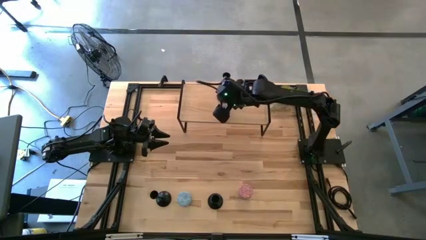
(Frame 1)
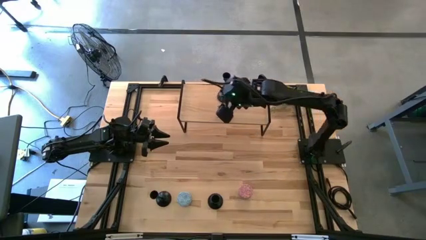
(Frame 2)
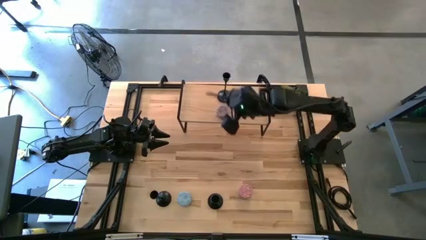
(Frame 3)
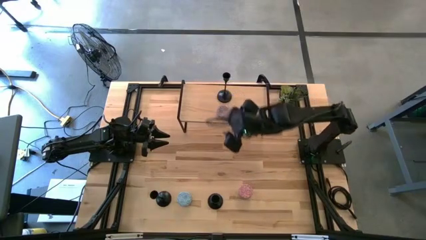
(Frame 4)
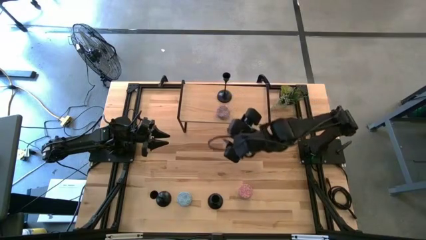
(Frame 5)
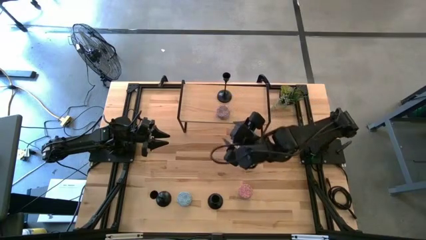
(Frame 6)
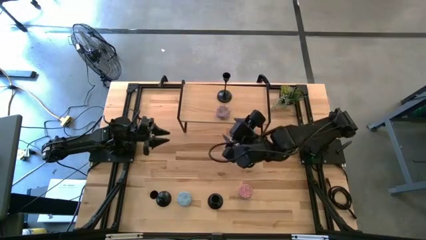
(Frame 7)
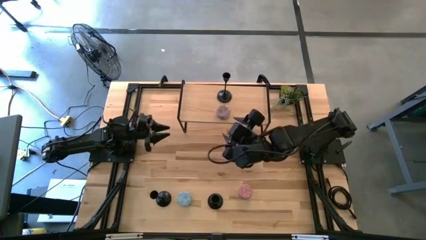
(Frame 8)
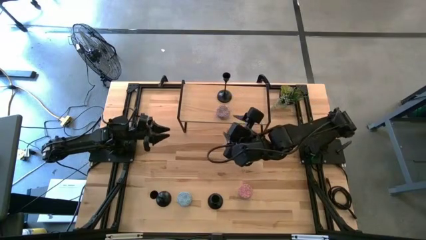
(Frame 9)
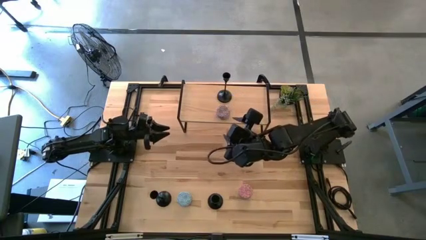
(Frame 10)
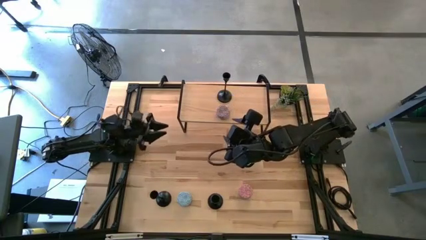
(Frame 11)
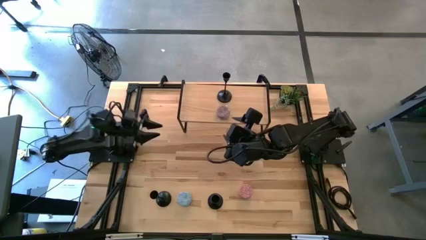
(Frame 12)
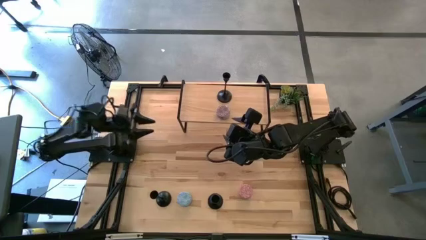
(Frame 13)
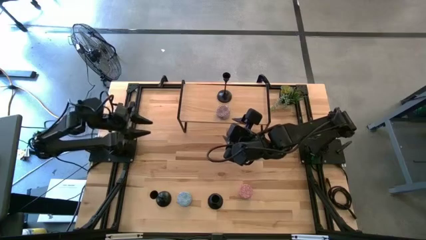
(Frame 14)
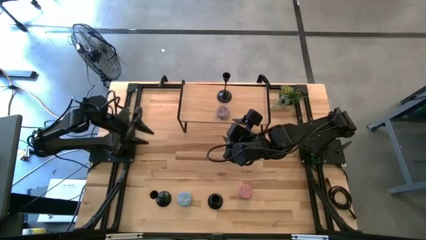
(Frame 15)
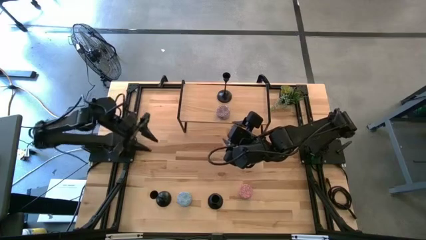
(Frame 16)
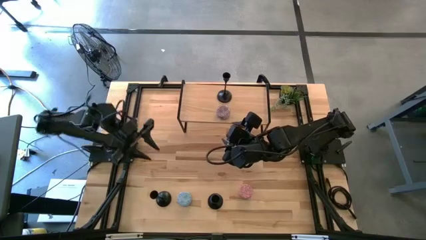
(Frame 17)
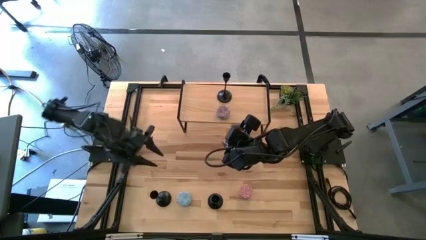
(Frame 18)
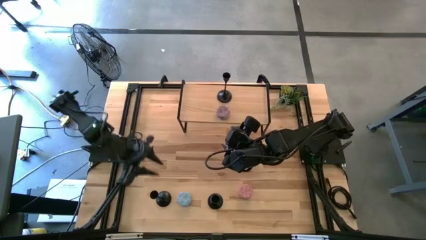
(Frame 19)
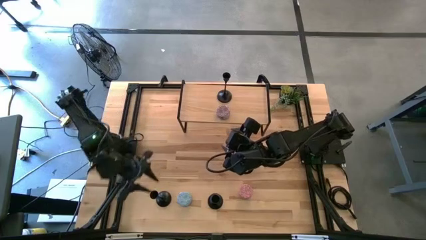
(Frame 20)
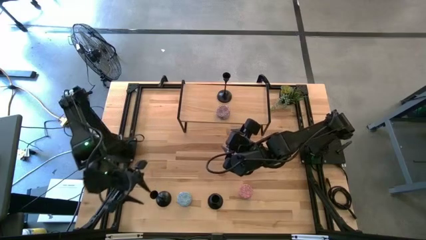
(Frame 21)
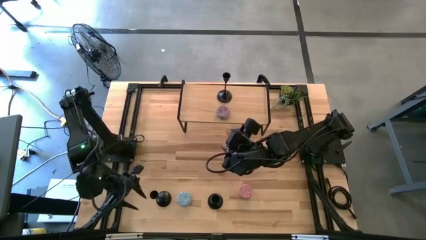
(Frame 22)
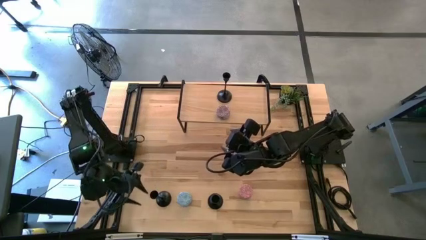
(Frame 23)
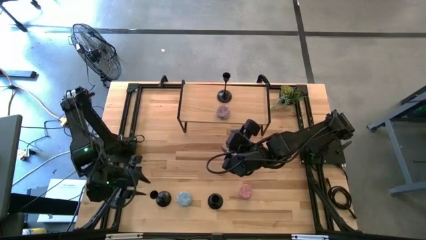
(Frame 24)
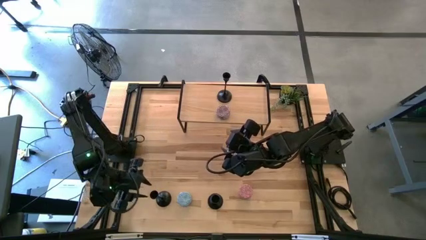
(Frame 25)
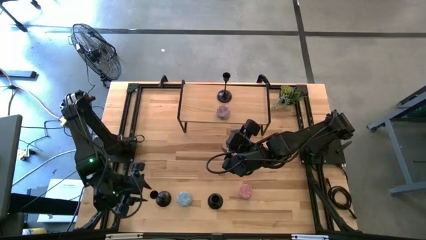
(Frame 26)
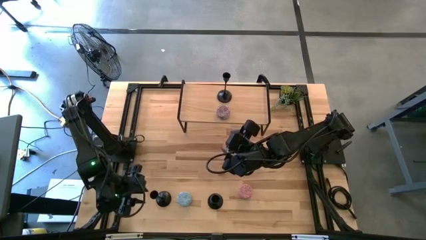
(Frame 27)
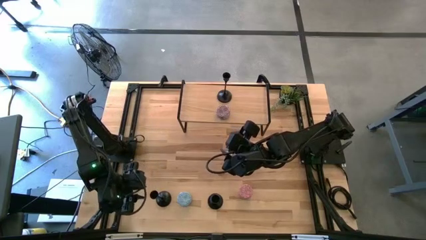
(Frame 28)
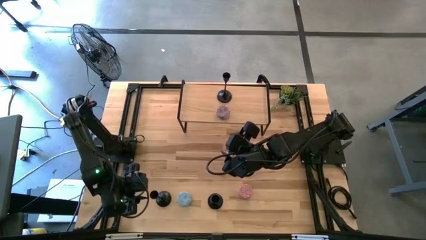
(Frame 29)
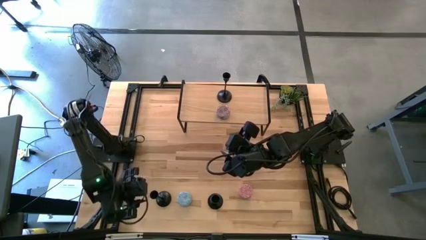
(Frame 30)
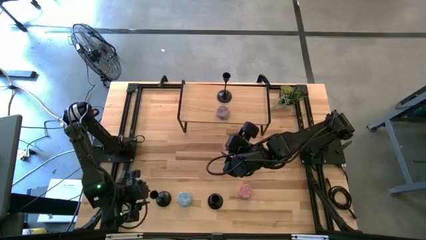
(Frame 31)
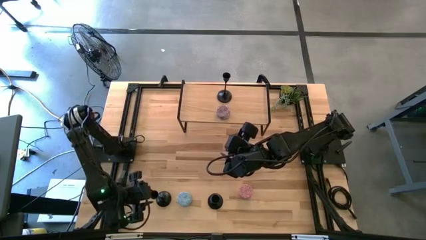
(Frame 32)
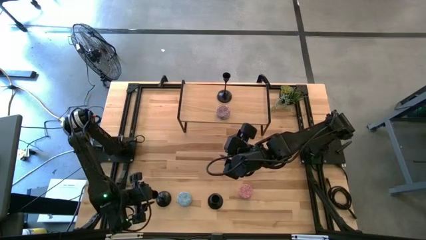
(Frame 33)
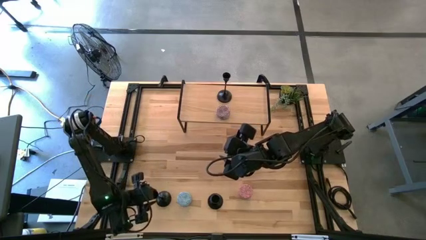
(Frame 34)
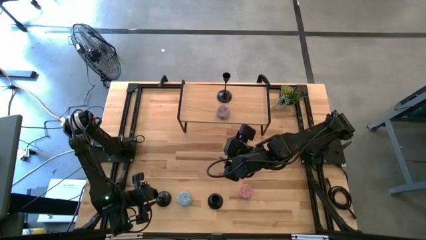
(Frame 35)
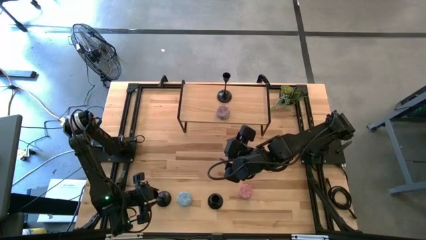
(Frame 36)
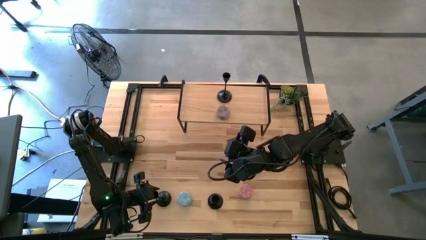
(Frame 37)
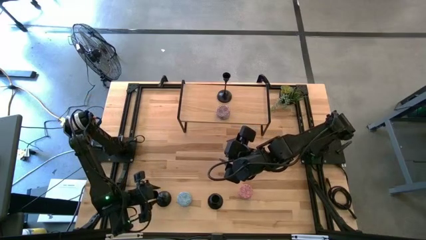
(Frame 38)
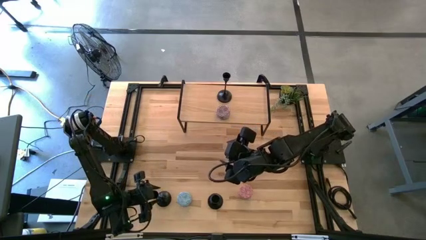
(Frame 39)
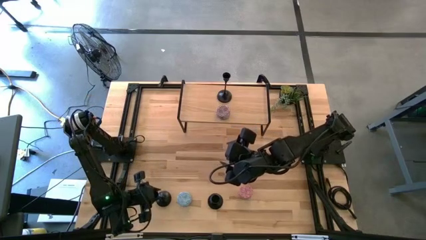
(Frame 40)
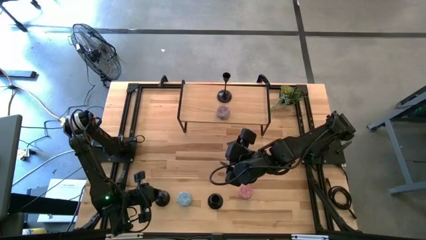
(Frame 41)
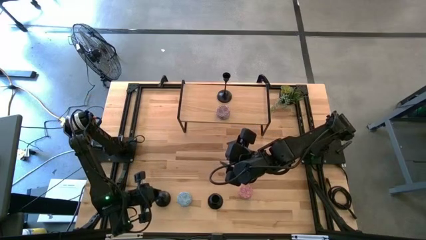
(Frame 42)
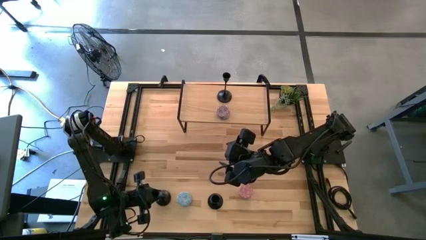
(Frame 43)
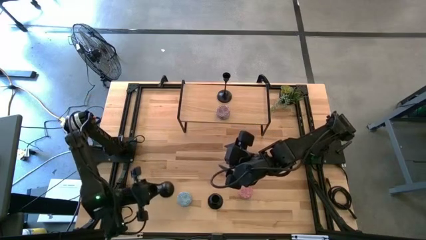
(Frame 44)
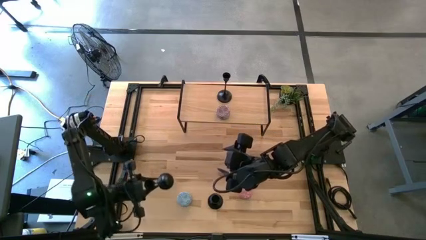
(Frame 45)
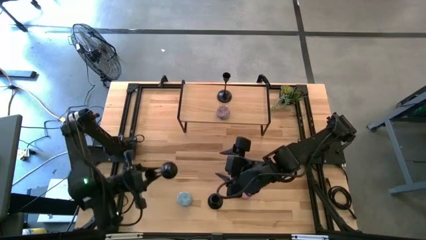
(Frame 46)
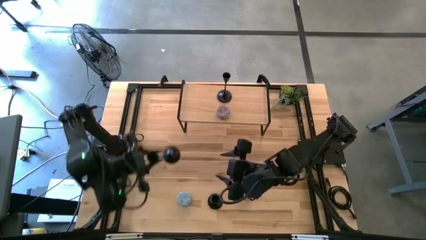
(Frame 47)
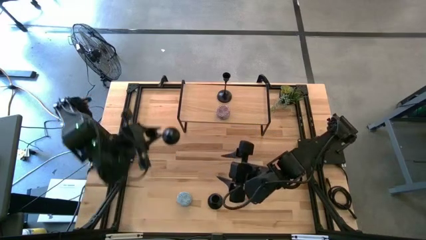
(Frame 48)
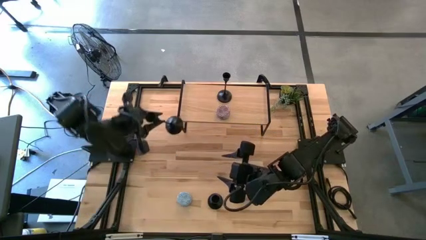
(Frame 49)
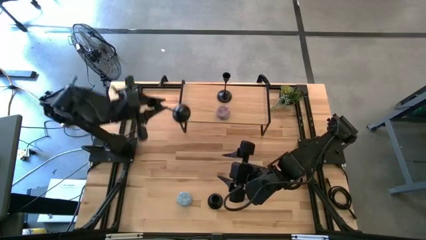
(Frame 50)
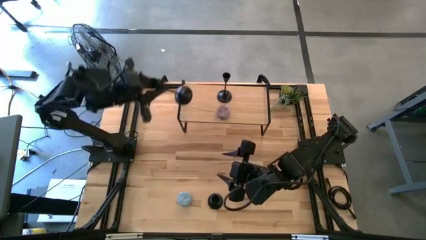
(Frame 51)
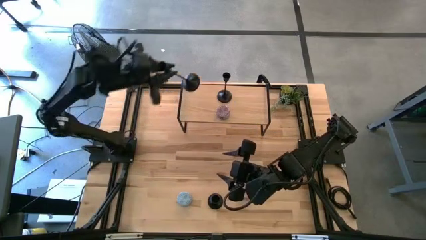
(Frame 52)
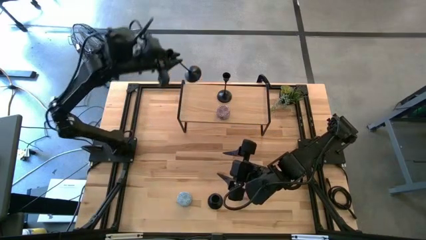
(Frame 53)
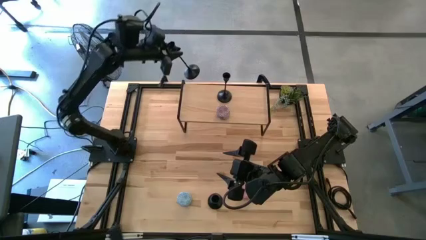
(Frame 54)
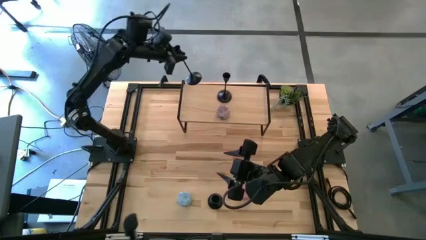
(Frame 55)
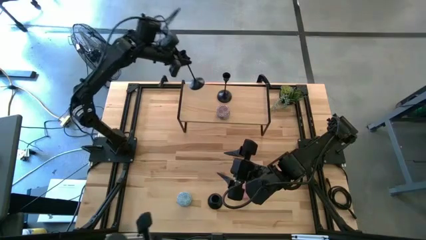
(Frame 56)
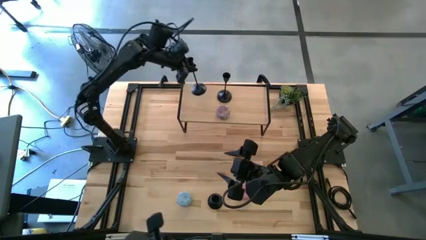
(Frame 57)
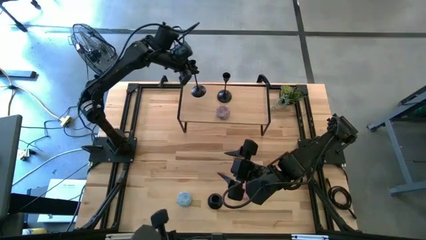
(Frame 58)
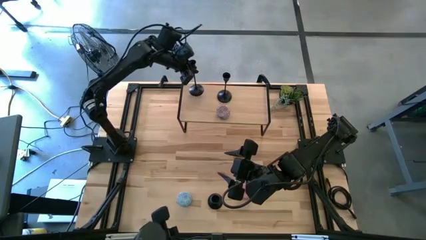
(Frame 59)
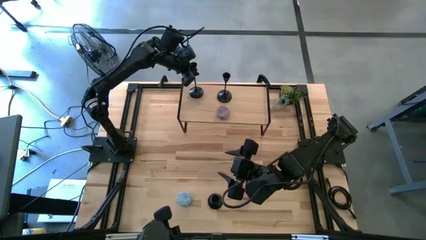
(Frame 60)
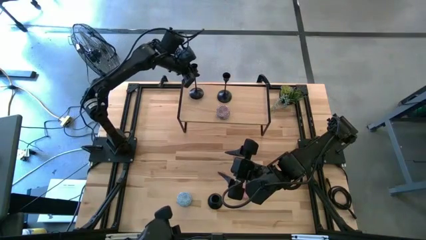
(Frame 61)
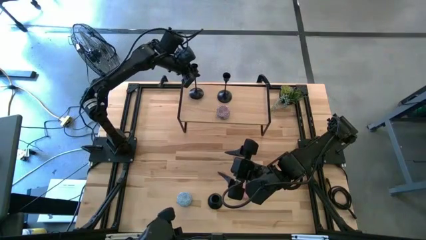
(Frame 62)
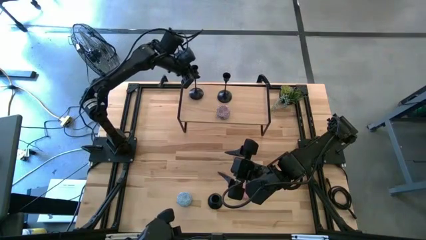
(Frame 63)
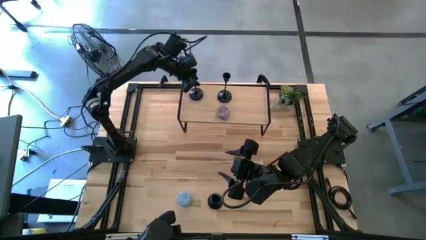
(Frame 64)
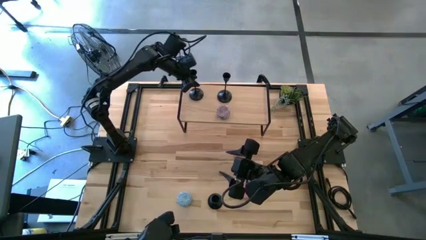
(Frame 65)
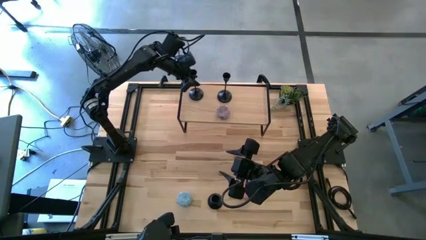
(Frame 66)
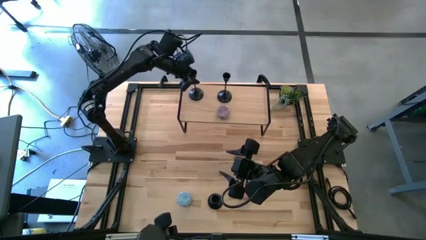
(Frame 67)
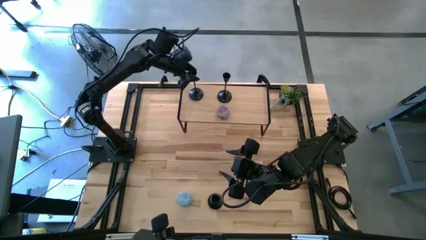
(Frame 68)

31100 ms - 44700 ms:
Task: Pick & Place candle stick holders
Put the left black candle holder on the shelf
